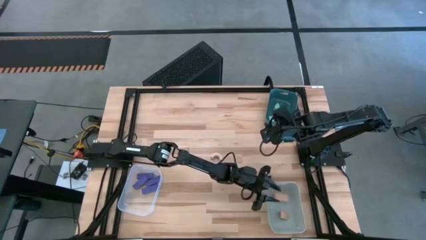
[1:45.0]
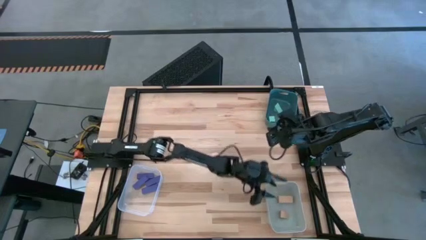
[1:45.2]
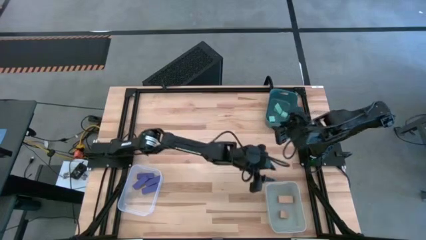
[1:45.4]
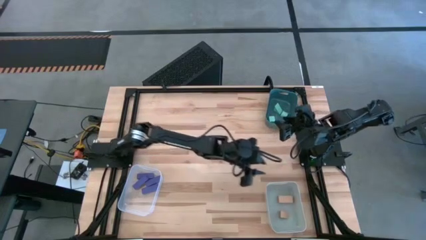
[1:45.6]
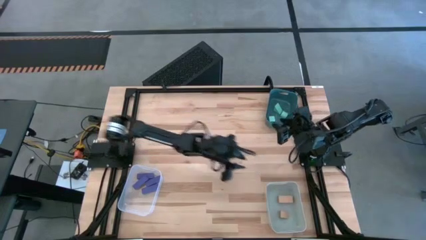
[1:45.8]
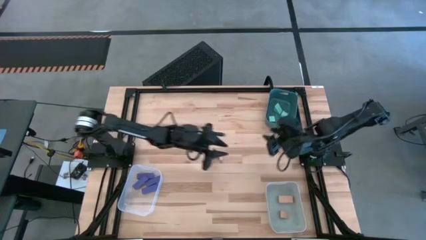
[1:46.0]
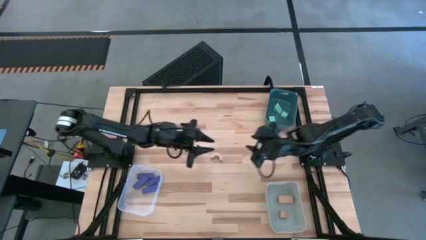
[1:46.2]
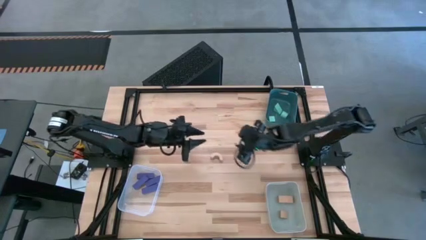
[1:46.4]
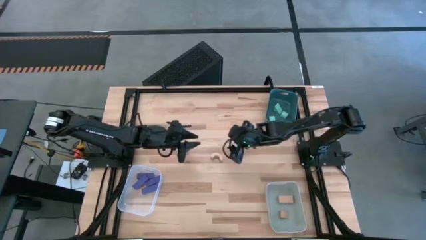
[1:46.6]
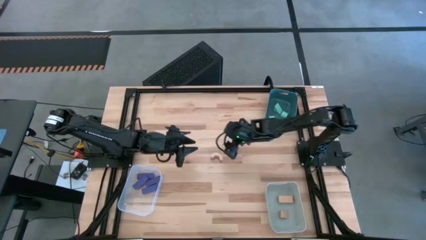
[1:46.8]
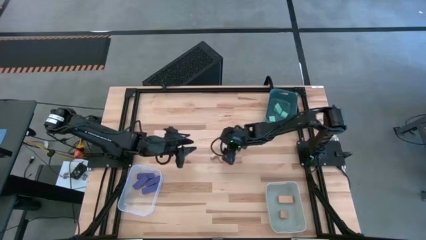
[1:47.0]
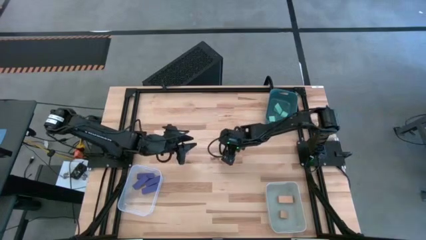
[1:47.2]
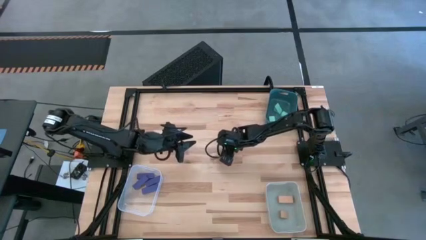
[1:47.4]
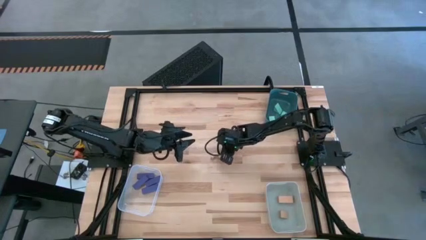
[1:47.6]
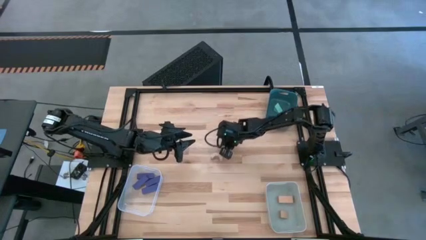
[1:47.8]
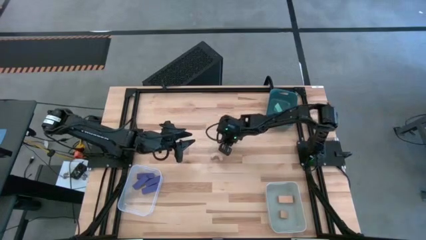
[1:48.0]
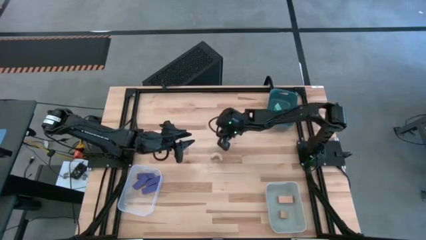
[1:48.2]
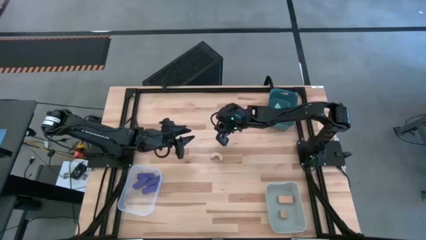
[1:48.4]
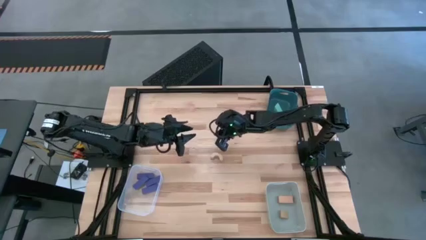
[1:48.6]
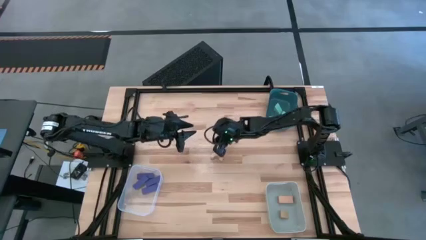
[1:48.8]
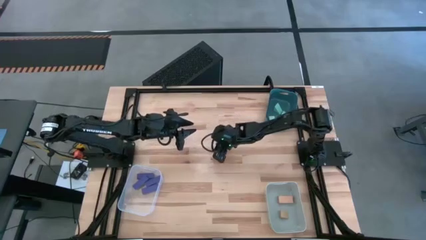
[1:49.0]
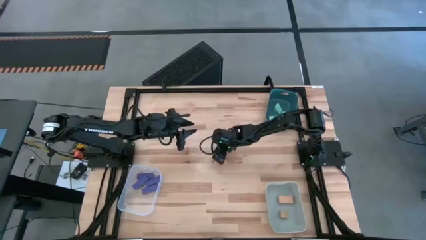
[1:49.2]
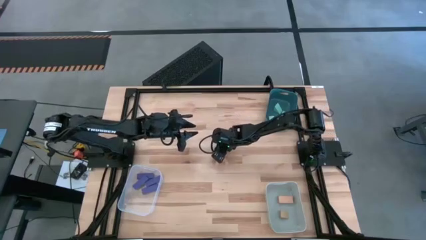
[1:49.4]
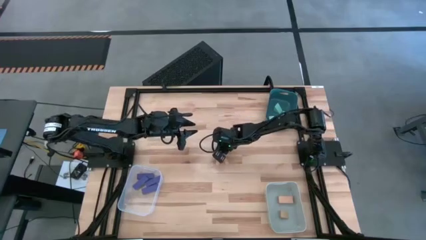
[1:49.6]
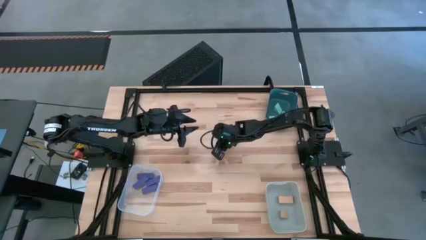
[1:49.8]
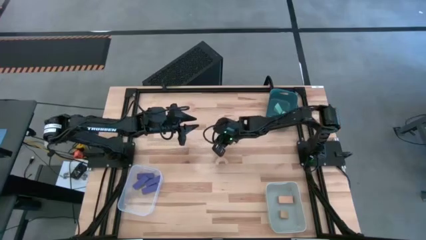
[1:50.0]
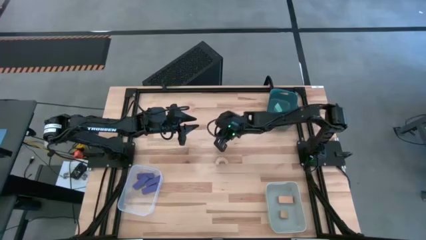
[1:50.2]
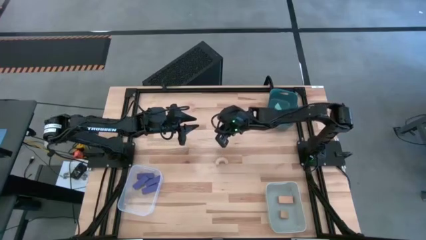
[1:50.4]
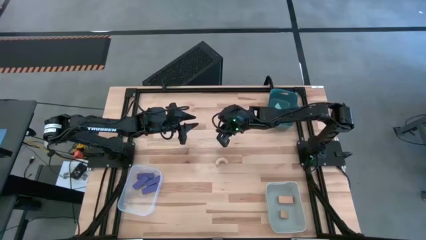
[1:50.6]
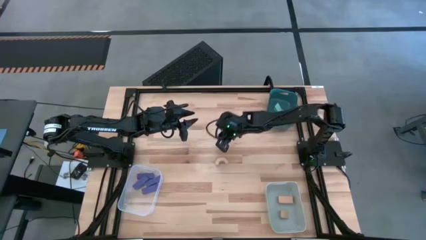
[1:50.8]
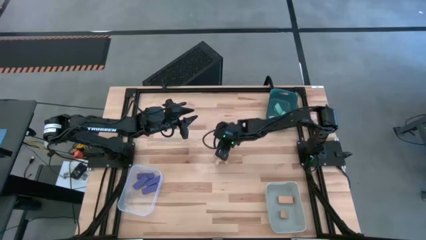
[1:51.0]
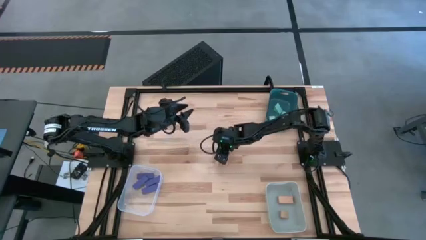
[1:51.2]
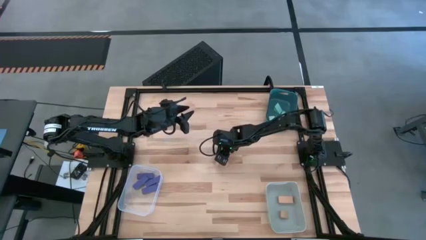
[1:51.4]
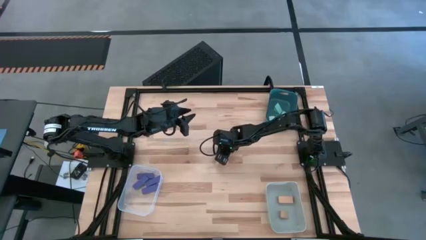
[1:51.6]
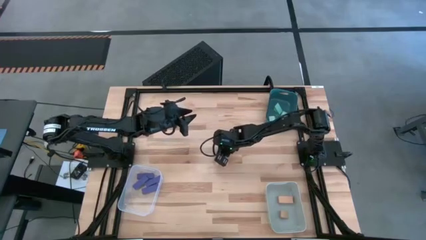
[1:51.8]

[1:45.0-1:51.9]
Task: Sort & place blocks by color
Put the brown block into the gray bin

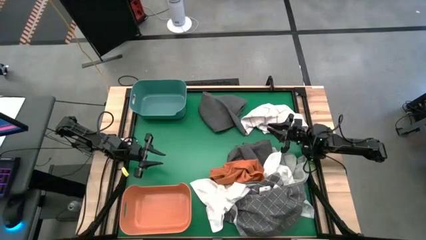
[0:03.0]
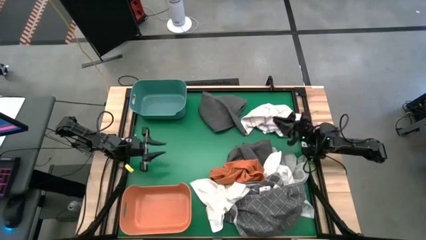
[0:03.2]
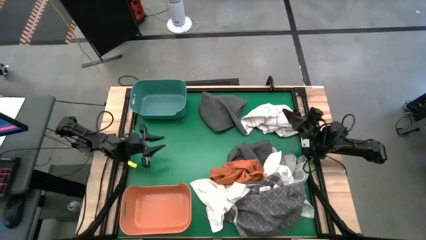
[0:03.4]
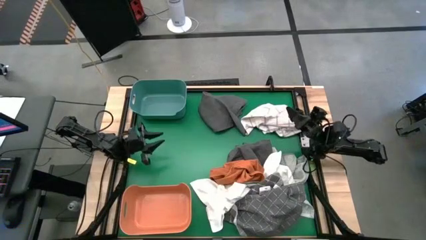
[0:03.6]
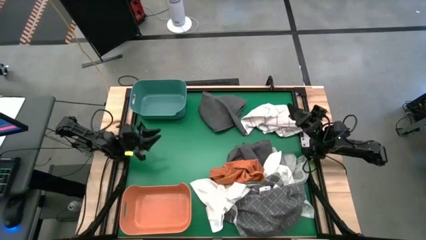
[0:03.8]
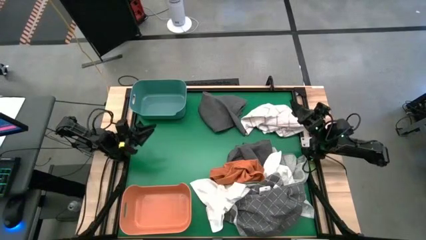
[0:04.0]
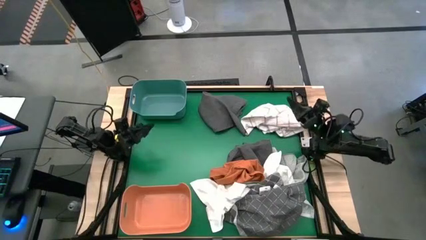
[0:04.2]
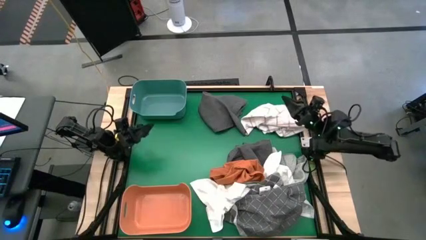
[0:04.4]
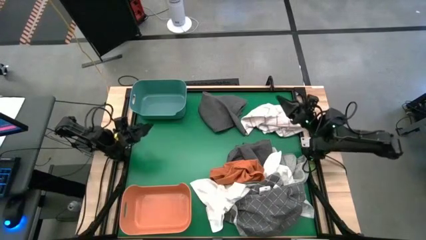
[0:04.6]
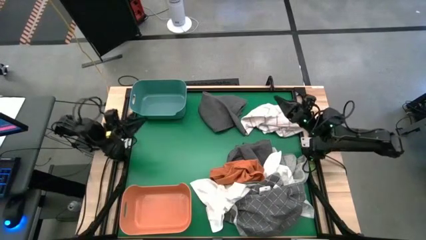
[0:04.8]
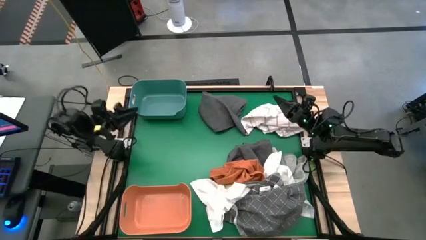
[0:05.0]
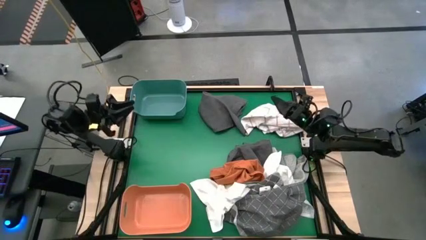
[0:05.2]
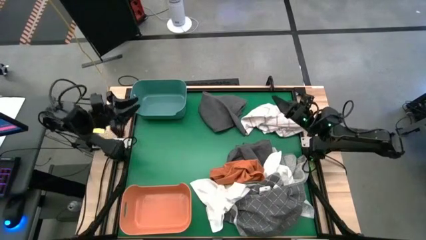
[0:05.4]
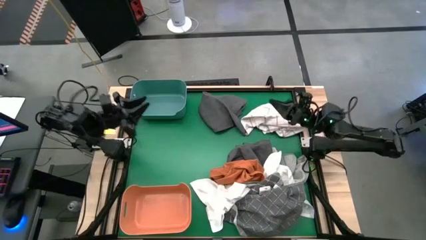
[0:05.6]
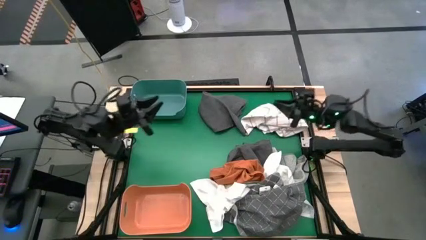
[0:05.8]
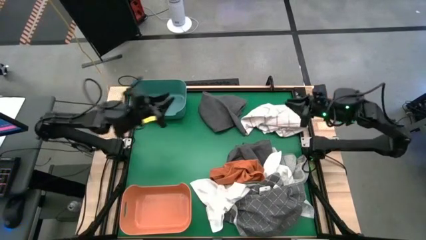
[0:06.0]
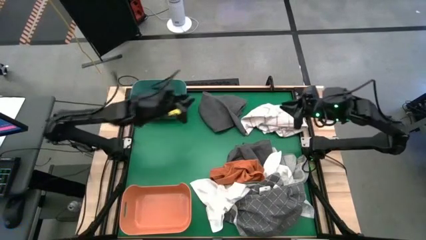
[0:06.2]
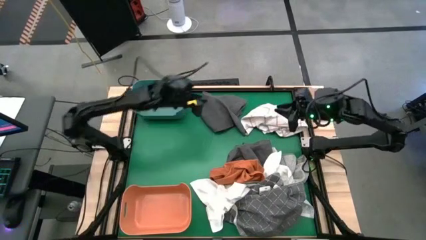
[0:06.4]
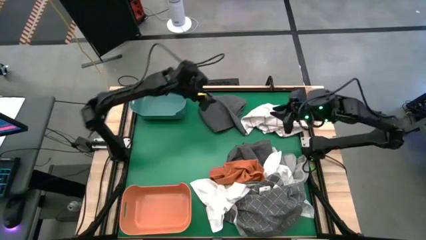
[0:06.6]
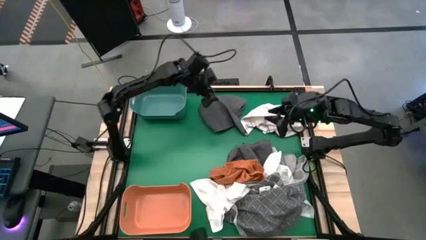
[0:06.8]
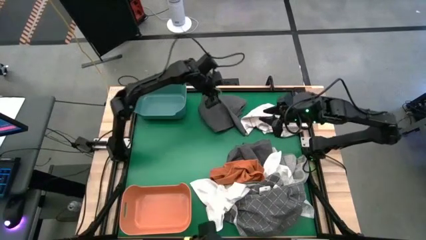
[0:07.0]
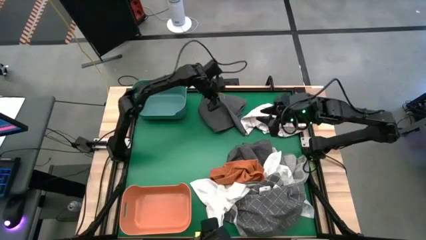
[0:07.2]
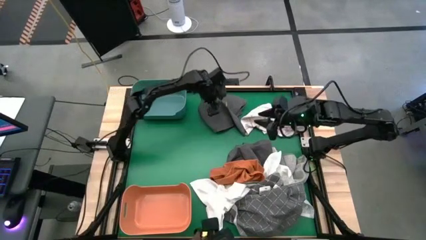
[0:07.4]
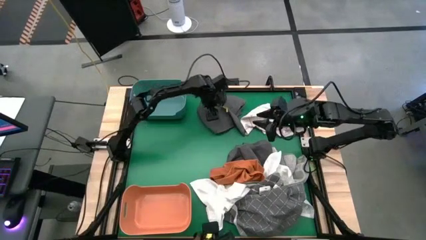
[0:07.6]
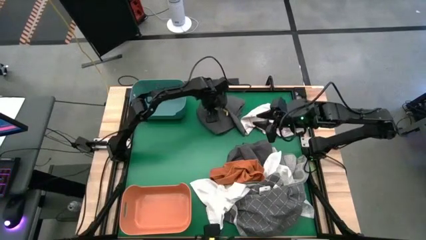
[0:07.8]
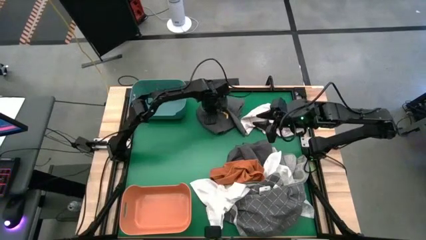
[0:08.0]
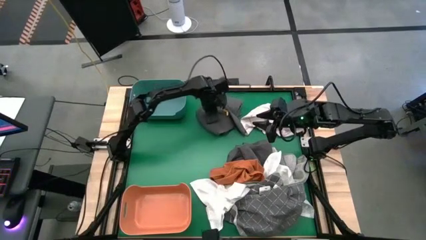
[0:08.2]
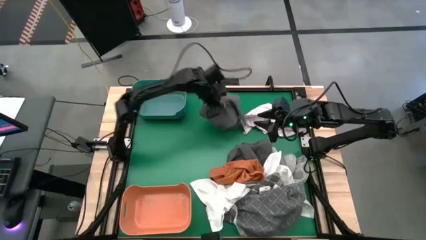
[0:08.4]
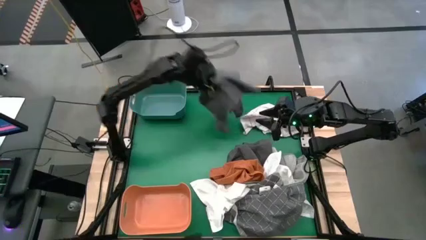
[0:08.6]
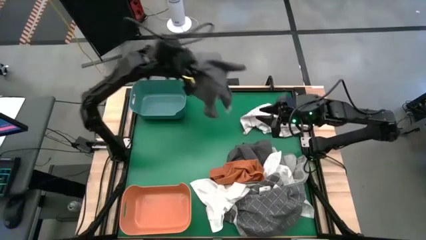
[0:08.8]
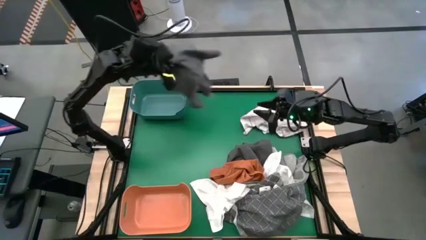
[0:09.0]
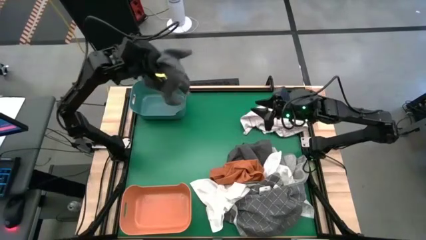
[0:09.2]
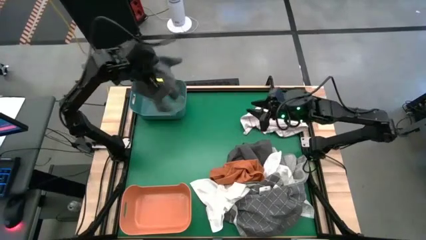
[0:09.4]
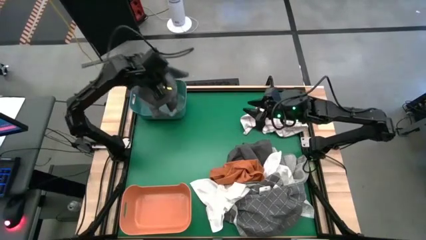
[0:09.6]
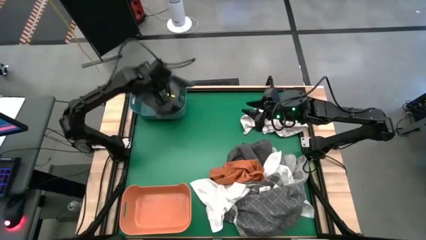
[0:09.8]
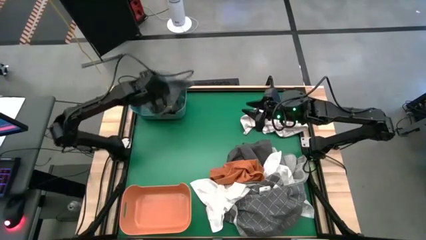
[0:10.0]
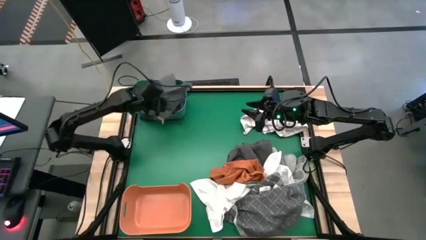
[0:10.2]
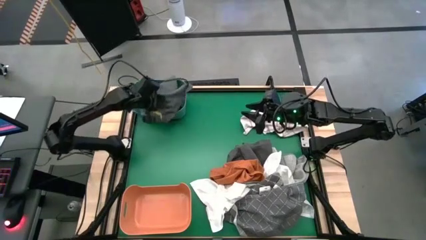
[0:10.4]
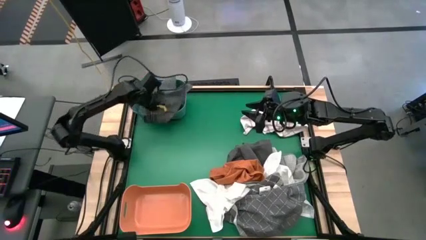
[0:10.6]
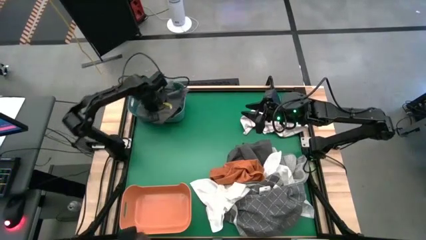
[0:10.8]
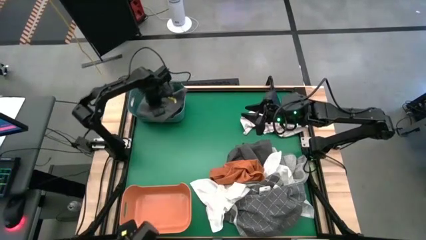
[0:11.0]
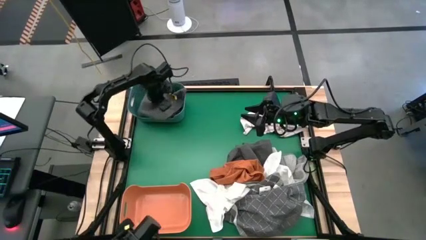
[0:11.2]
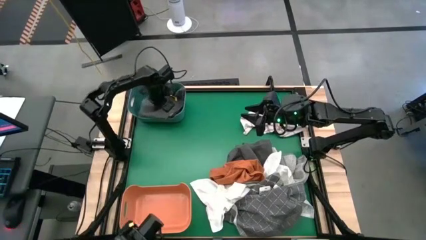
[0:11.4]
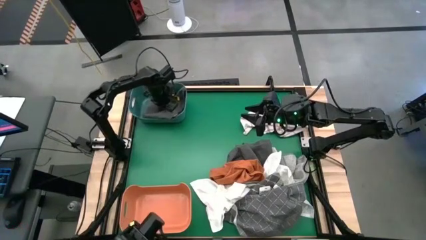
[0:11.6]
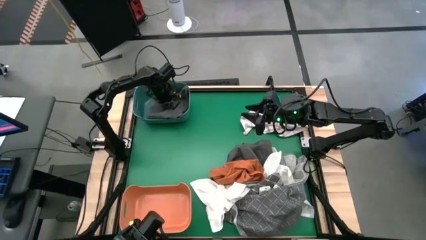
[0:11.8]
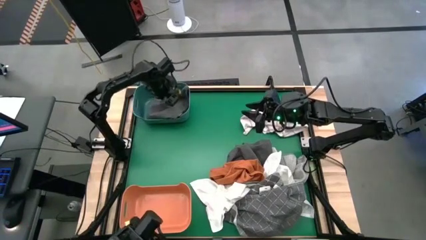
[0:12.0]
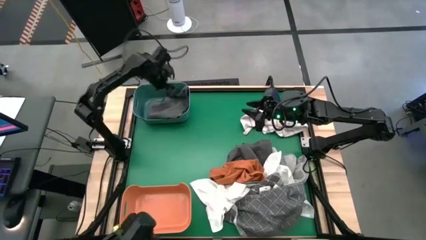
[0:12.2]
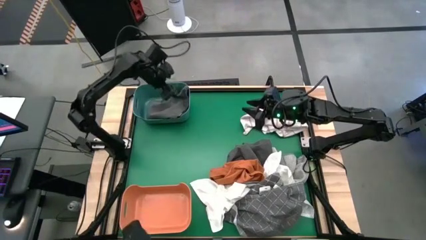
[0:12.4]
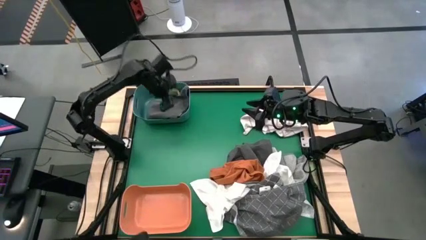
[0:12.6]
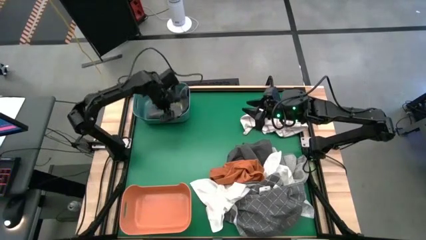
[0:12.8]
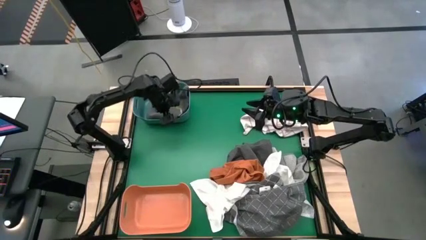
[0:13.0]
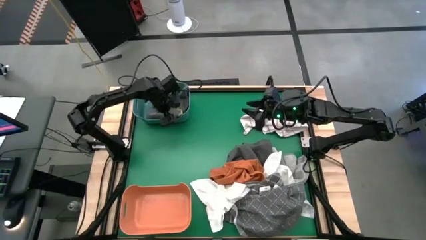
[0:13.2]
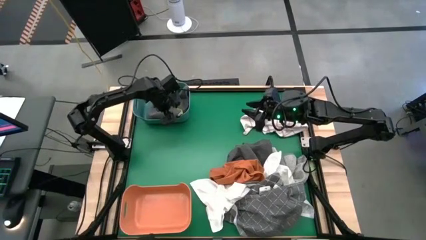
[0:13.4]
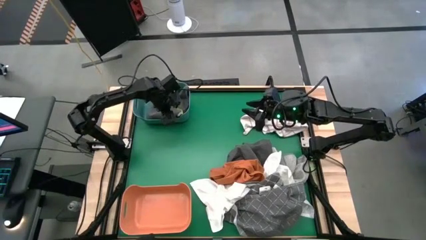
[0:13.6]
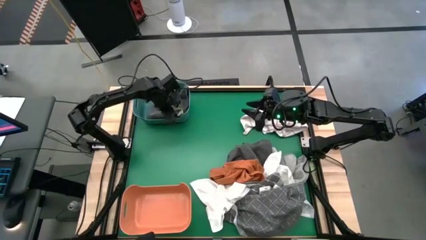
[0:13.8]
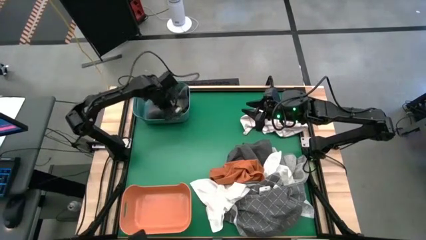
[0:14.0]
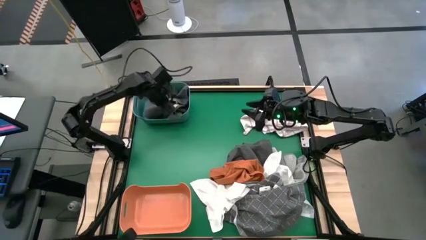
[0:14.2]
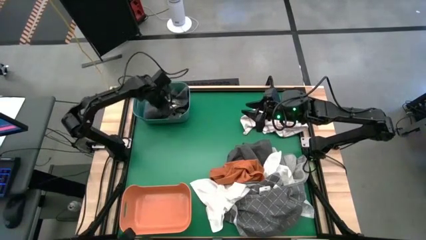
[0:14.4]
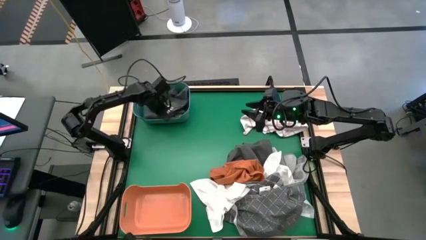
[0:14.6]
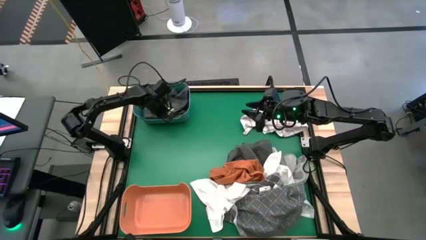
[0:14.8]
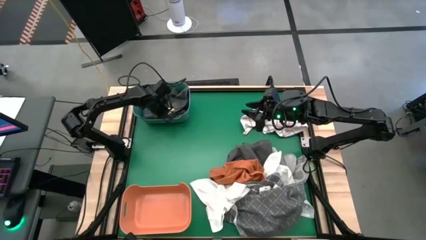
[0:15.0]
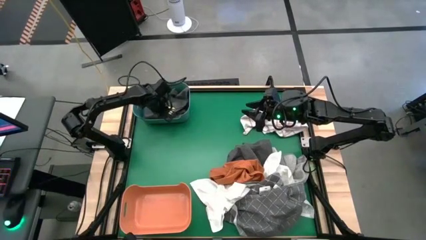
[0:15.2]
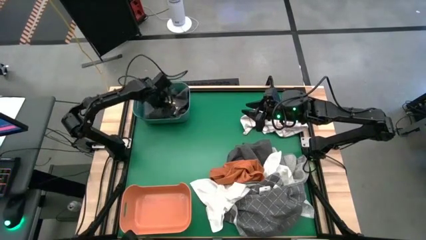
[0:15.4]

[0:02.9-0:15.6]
Task: Sort microfiber towel by color & place in baskets
Put the top black microfiber towel into the green bin
